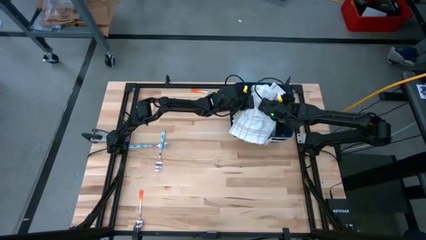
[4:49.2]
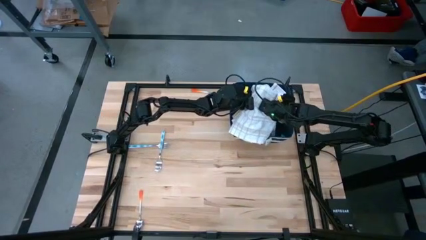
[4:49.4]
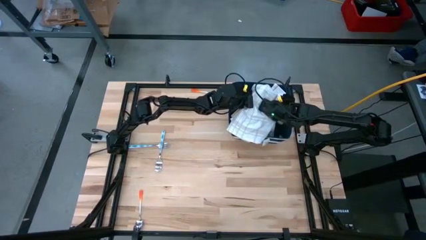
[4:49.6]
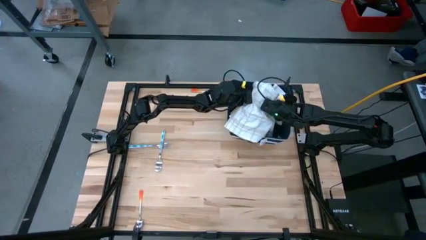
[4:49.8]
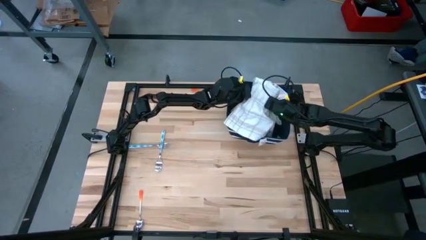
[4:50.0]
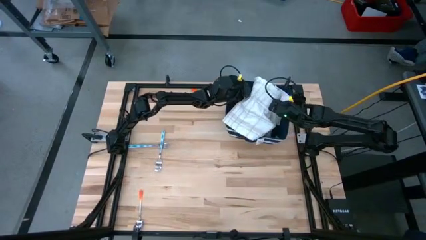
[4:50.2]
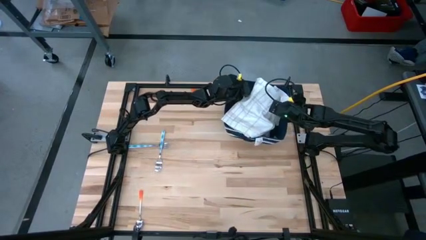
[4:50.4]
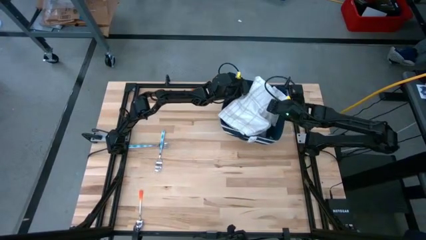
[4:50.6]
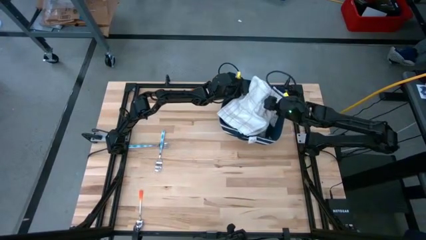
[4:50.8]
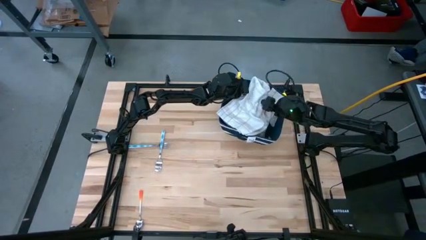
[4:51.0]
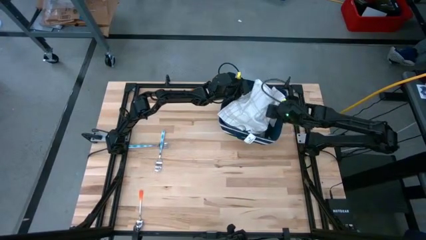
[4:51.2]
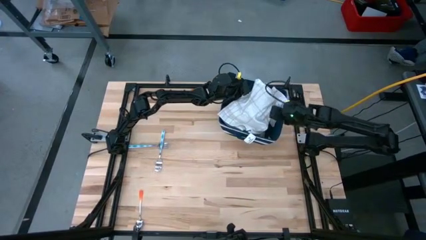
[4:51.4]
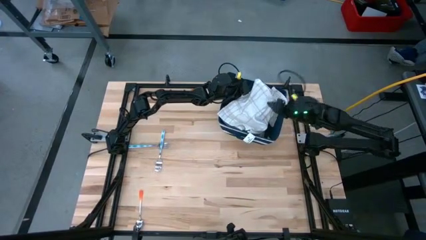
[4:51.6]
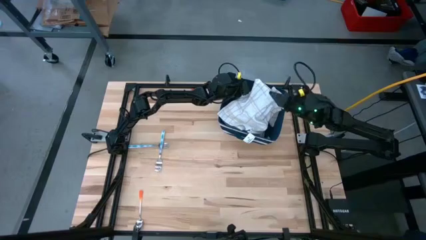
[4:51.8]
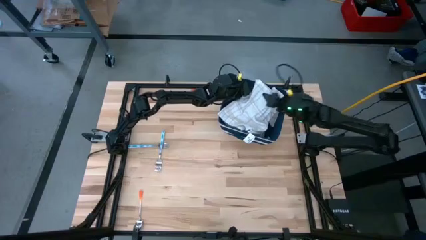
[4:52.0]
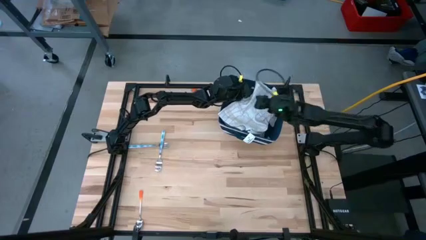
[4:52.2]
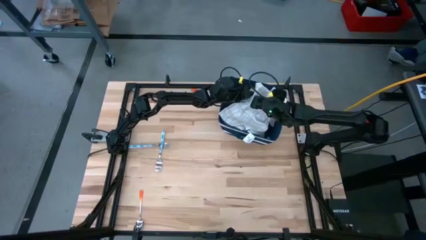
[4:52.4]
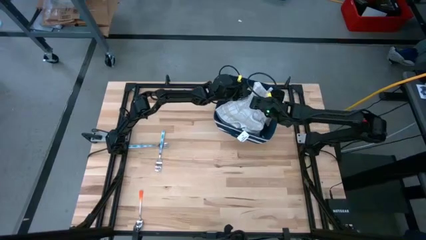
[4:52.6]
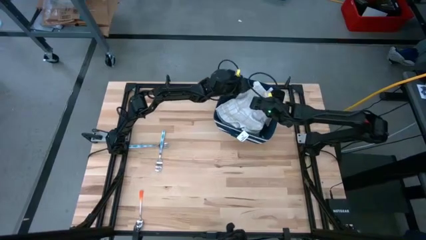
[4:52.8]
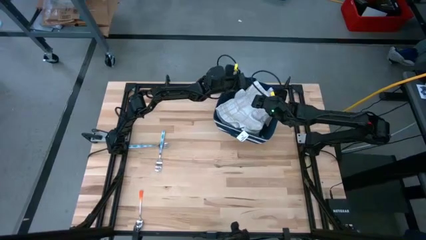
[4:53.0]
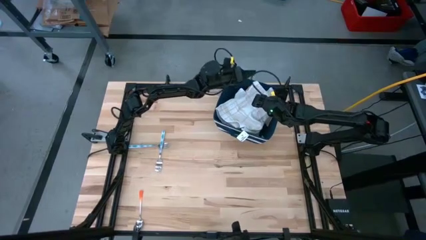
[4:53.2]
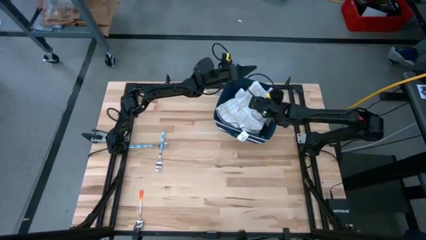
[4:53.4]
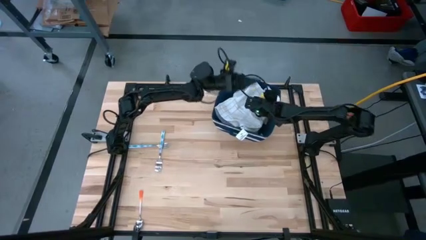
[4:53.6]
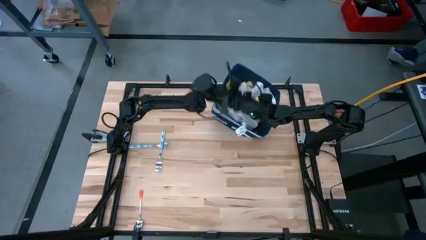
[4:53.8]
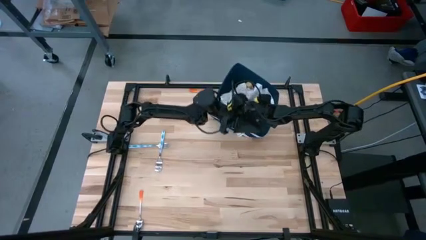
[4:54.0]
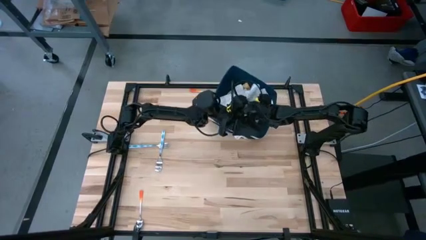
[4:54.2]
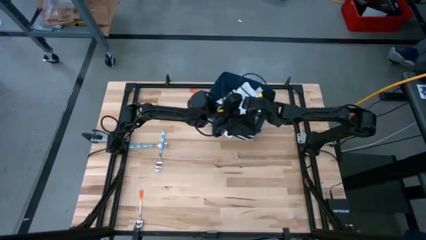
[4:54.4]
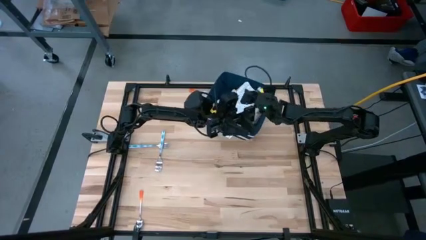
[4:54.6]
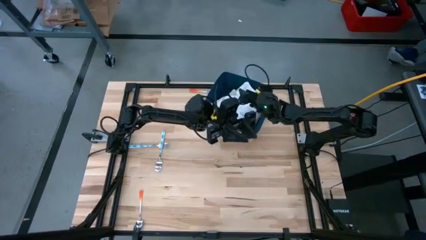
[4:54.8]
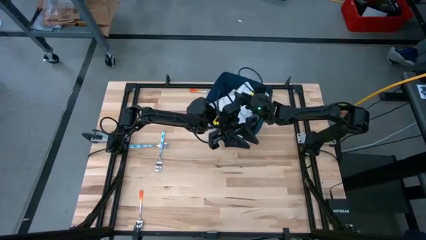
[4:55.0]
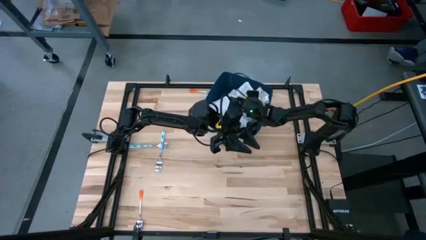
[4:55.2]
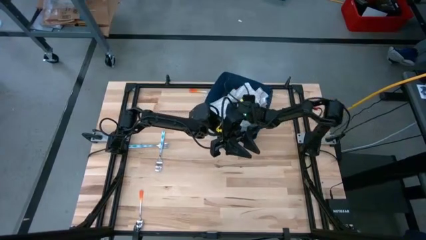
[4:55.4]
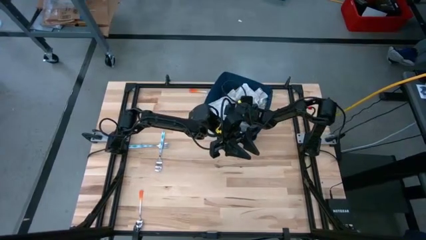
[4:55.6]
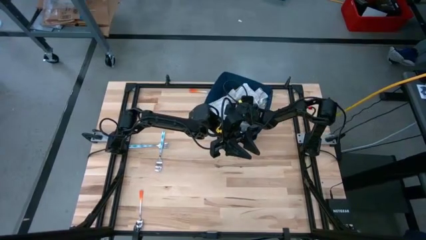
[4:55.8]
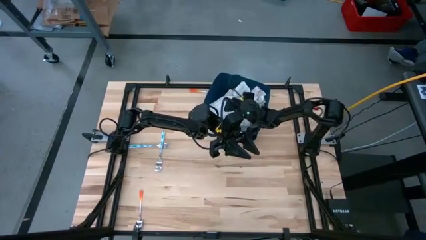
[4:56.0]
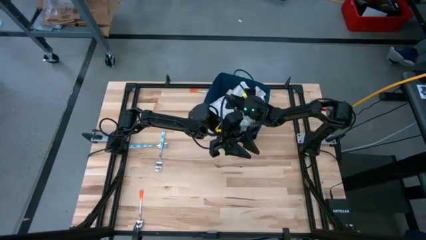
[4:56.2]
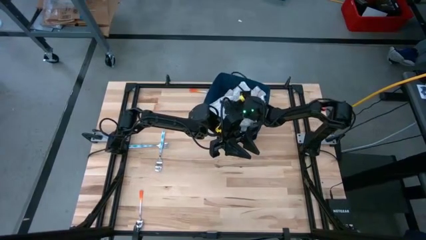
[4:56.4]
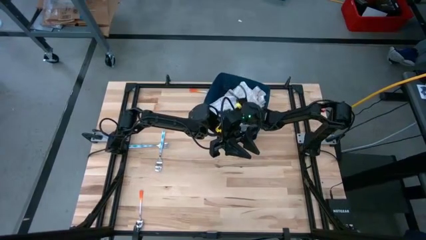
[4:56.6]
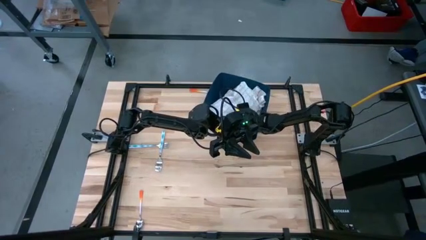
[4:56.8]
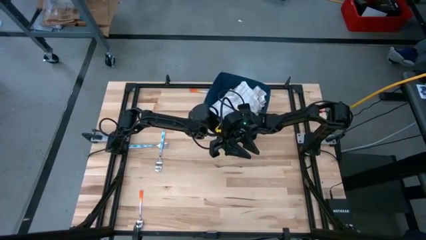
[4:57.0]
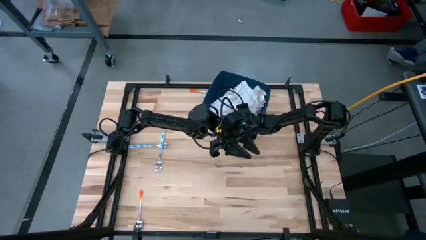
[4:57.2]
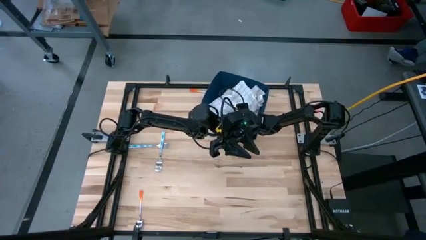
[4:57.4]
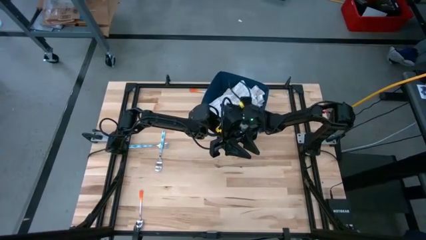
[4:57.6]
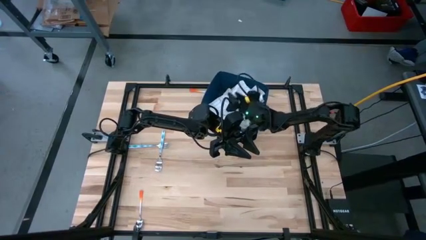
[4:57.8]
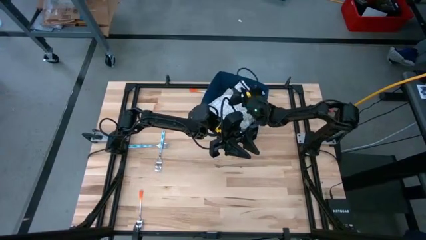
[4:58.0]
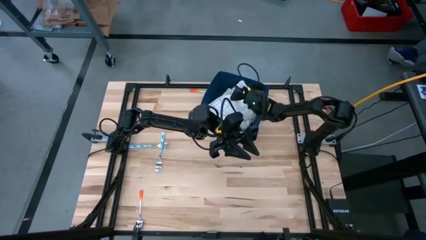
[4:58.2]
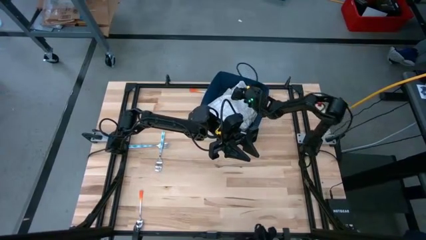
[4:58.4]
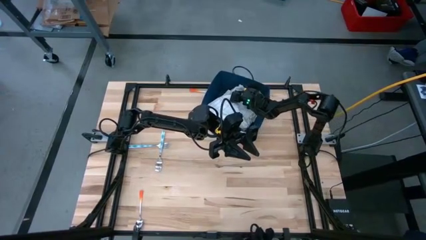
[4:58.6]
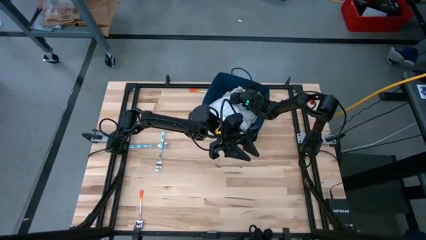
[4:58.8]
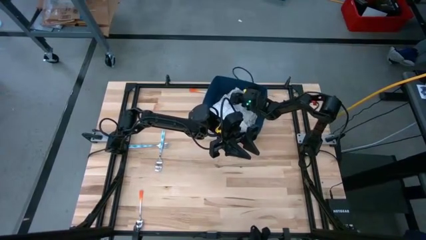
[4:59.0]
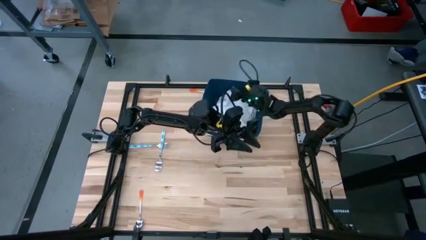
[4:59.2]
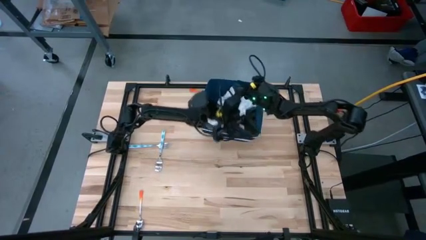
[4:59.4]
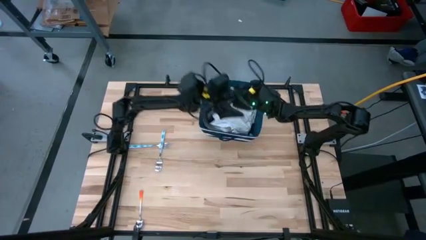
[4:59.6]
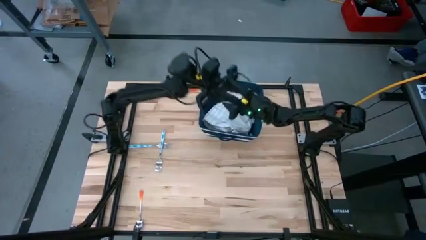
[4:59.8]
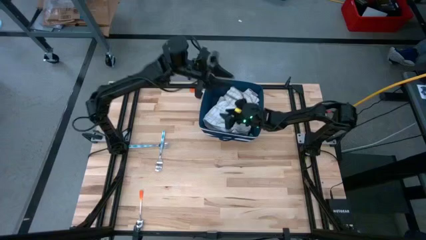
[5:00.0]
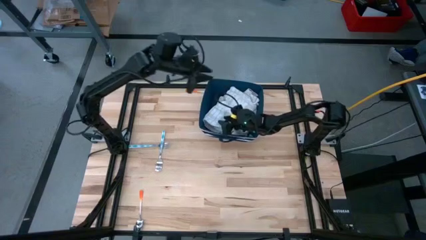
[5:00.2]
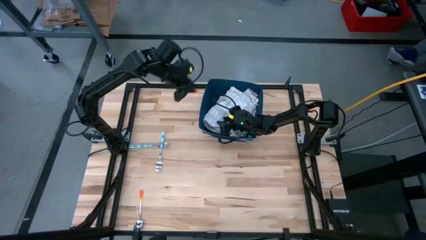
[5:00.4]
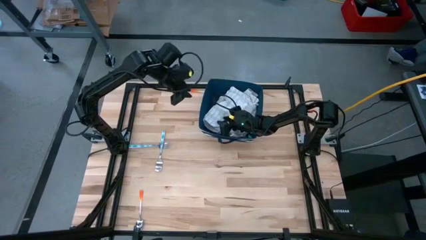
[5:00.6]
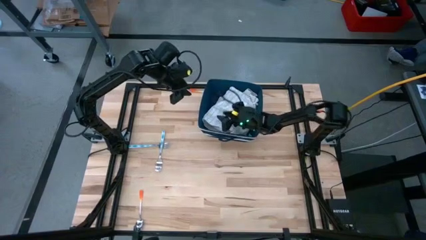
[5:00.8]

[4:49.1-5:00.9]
Task: Fold towel
Put the stacked and folded towels into the blue laundry bin

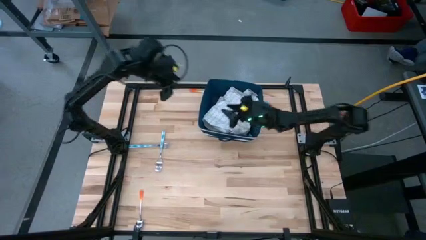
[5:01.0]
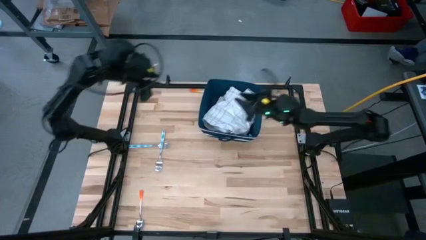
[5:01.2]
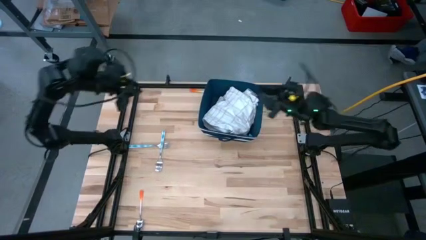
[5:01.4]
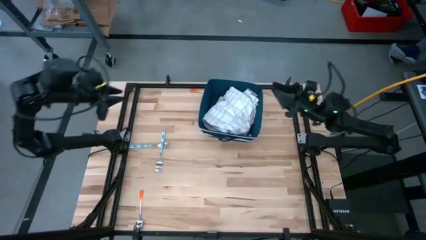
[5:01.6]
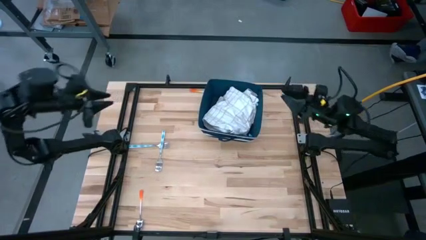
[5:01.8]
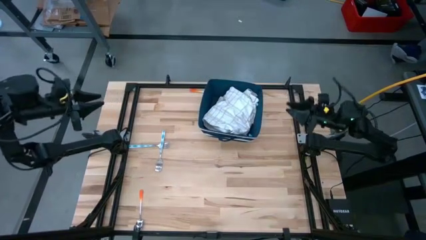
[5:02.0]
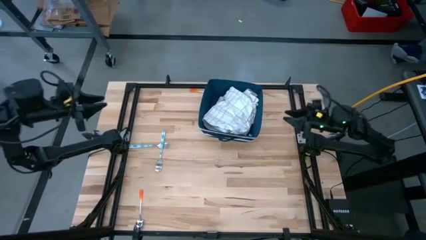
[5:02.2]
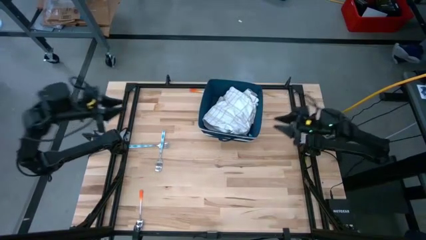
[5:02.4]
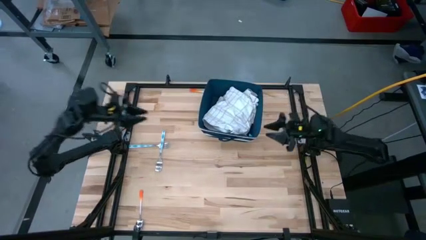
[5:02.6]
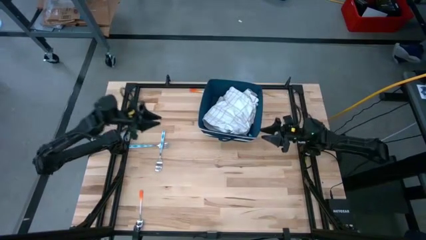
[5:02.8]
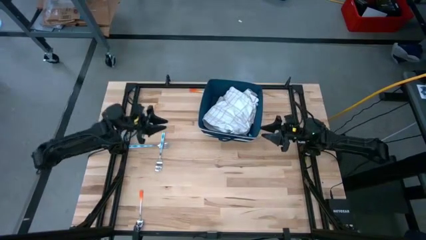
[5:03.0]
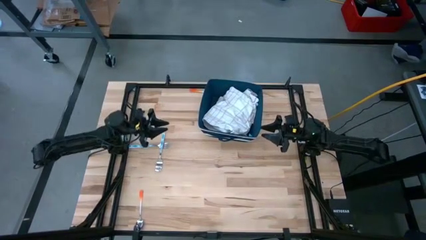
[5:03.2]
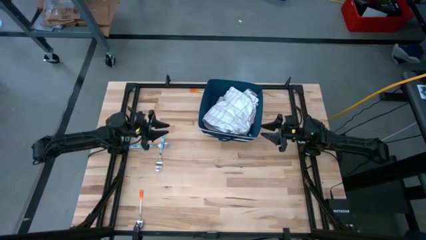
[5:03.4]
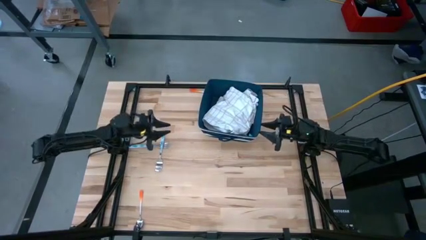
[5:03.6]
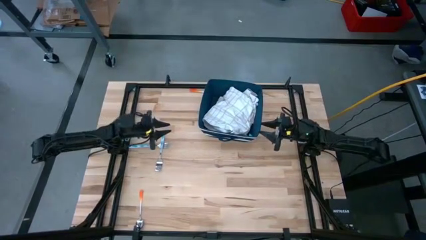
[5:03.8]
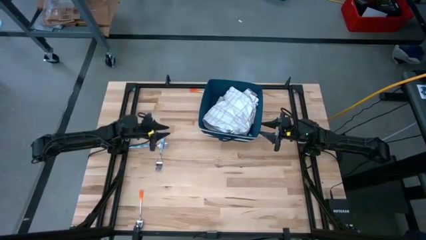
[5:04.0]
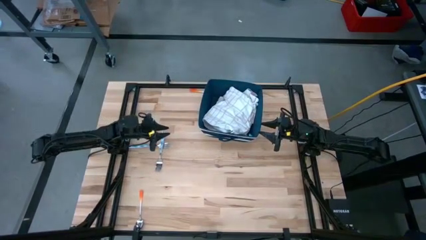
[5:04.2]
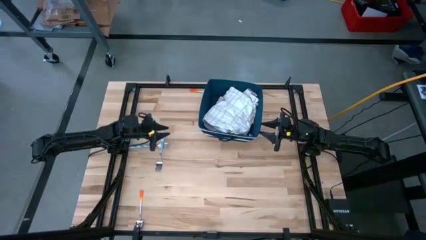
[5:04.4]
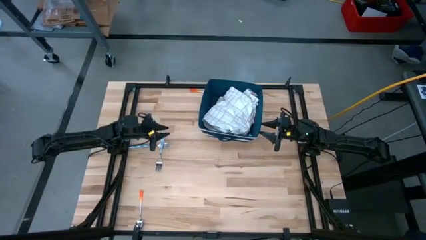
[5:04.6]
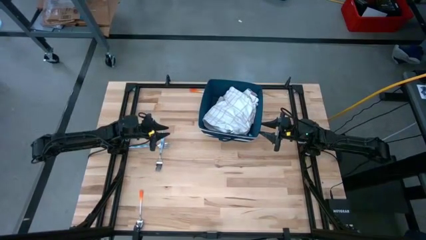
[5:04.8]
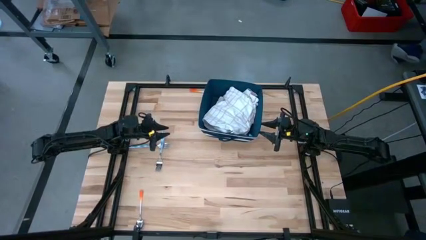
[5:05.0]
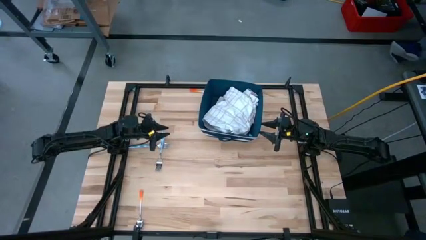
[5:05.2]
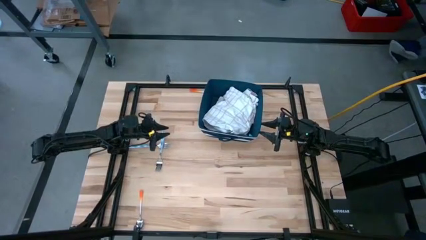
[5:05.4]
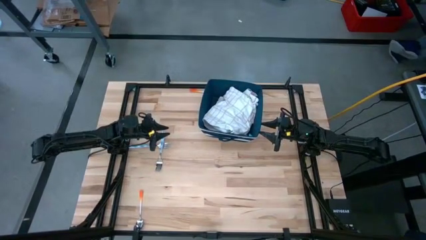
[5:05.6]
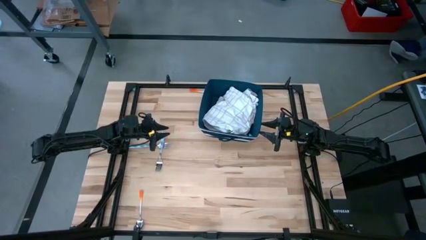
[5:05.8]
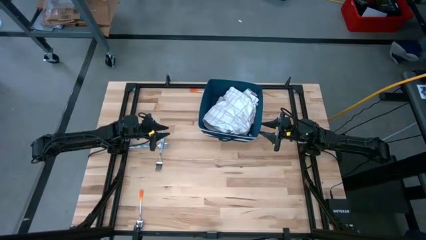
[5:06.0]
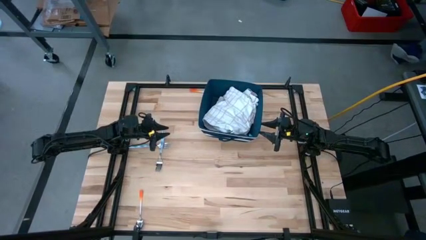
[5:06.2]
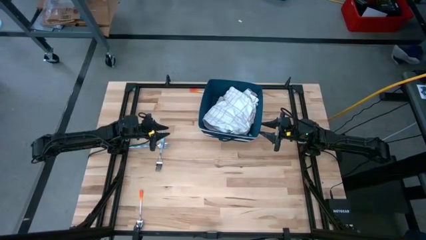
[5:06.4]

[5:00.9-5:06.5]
Return to Home Position
